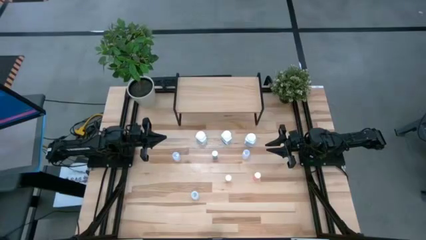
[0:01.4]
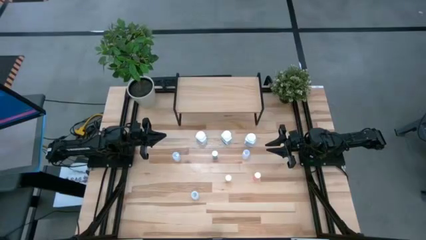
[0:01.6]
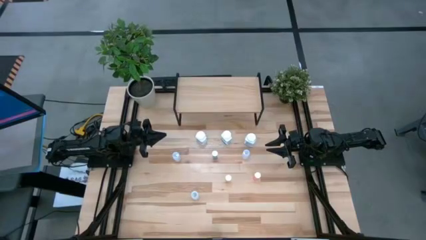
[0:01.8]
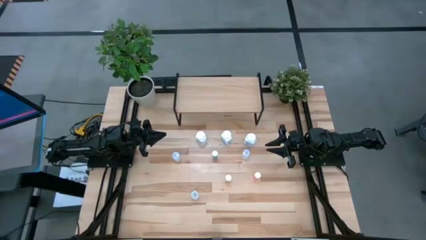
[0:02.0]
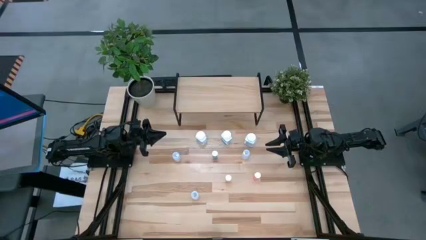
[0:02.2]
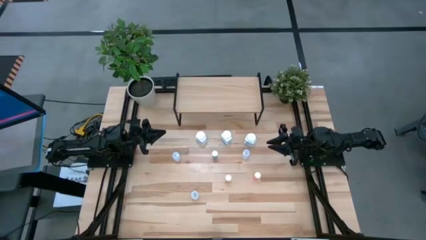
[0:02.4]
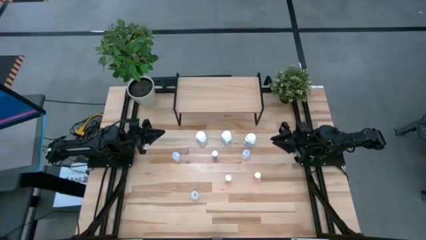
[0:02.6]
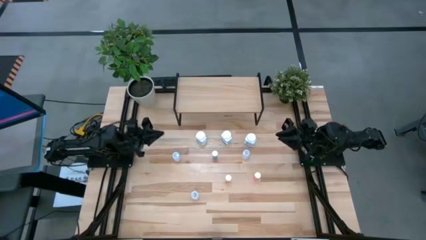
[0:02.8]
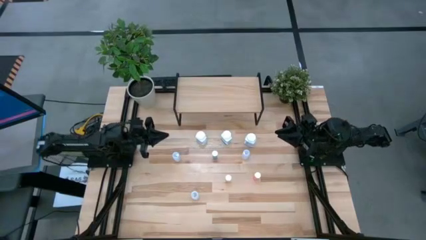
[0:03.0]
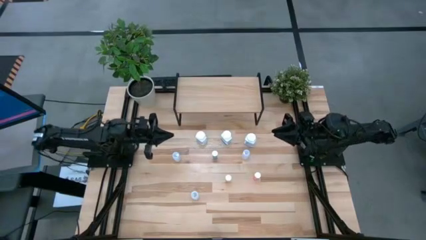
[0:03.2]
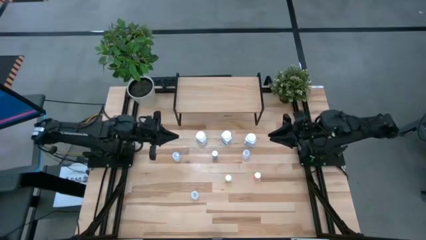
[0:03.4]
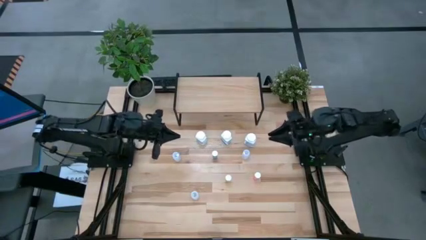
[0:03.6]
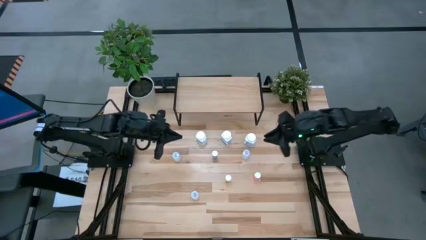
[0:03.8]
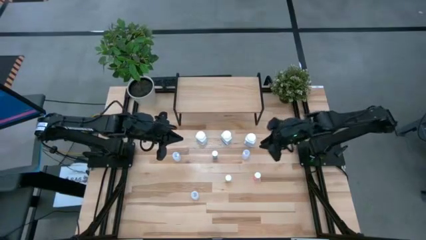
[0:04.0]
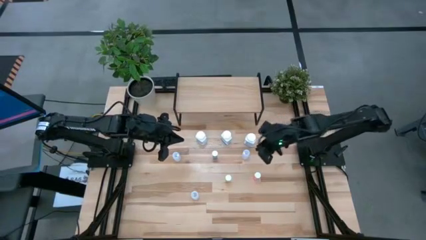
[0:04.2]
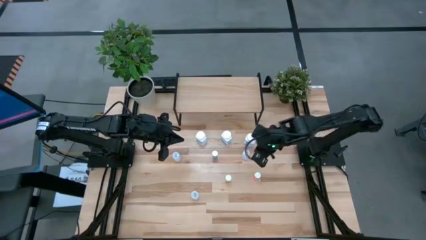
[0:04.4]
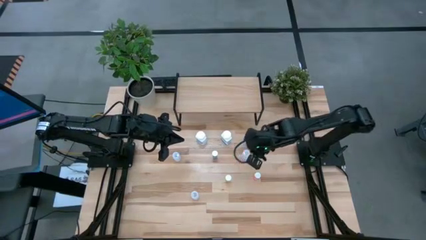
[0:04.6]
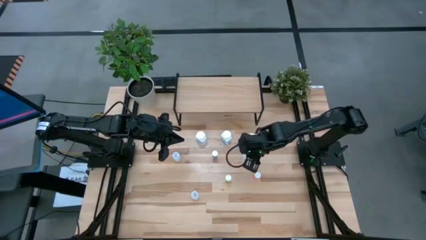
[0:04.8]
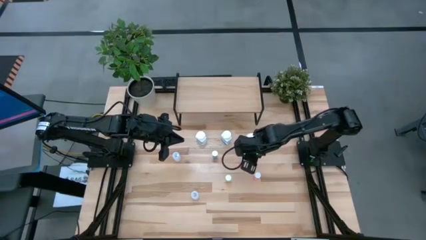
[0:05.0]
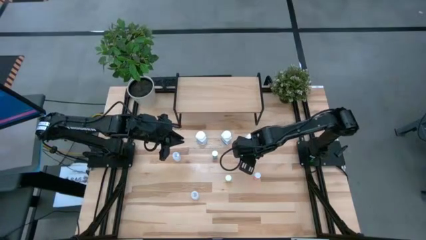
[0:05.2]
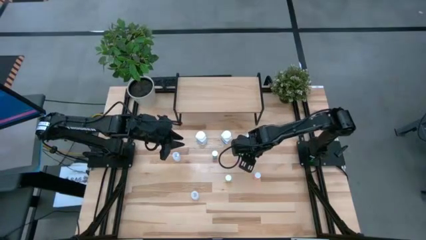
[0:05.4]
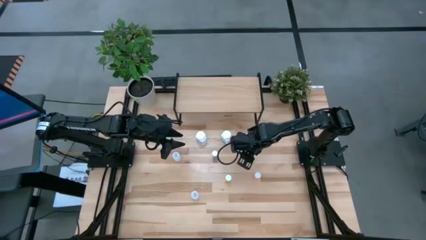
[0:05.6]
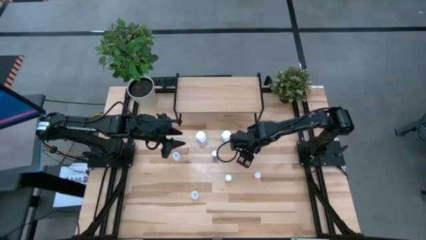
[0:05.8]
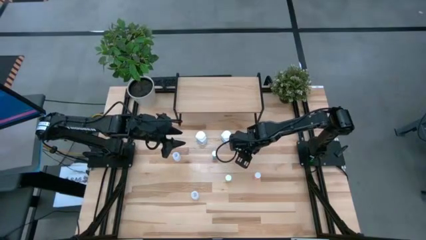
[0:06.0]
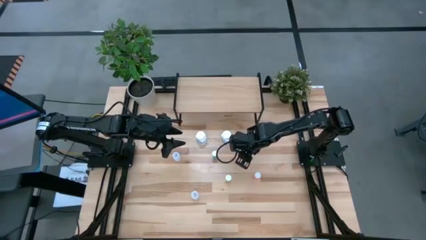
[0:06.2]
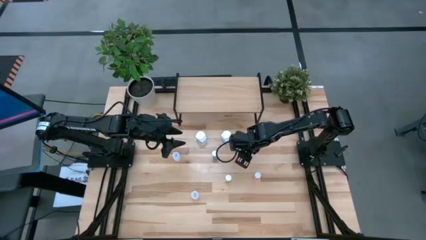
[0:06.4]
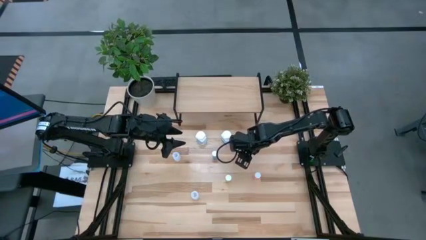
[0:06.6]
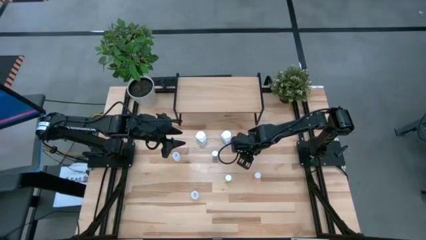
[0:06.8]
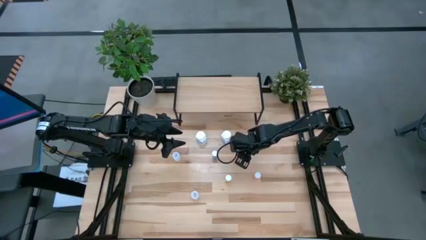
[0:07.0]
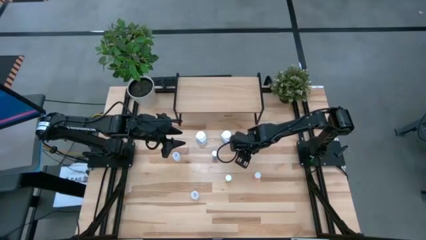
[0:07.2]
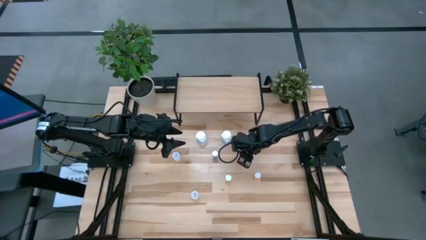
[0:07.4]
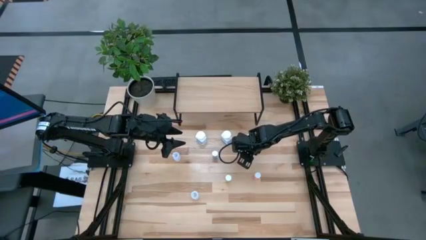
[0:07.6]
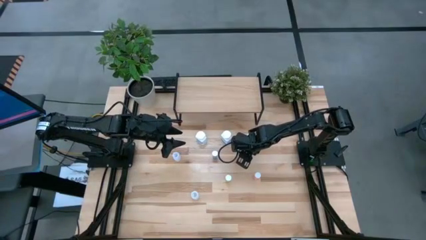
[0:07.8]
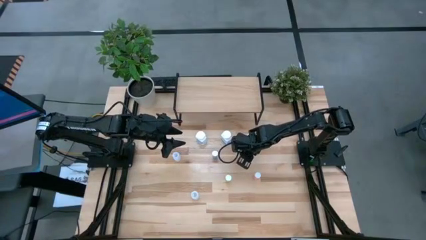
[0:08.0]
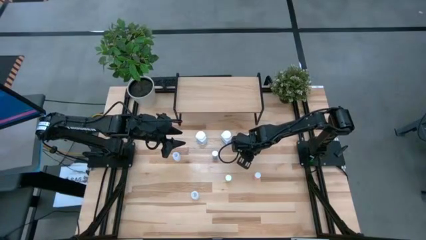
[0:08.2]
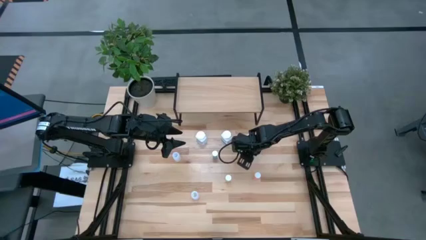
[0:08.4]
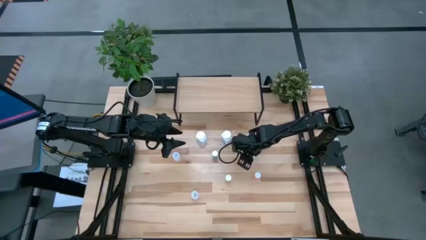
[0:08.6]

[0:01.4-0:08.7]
Task: Pick and place medicine bottles onto shelf by color
Put the top right white pill bottle on the shelf

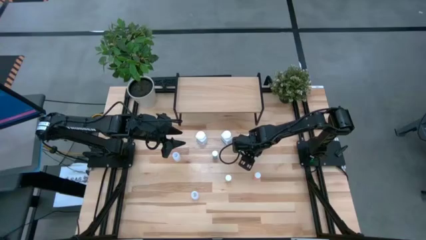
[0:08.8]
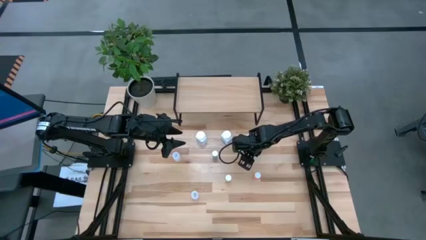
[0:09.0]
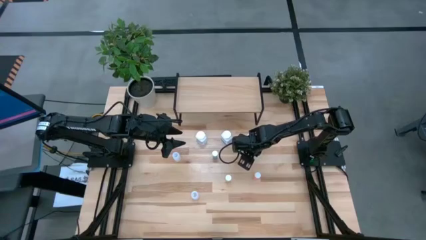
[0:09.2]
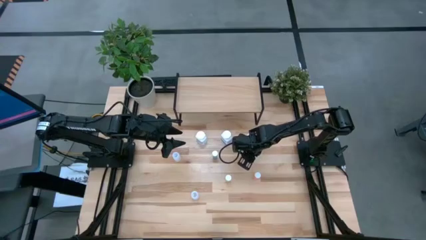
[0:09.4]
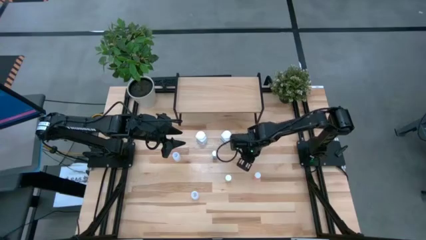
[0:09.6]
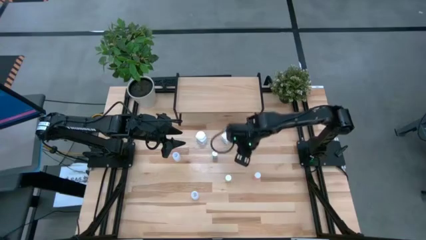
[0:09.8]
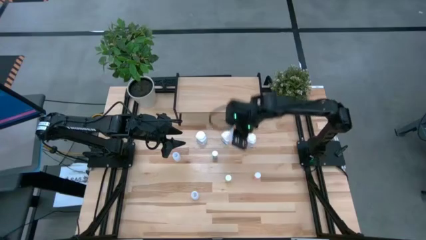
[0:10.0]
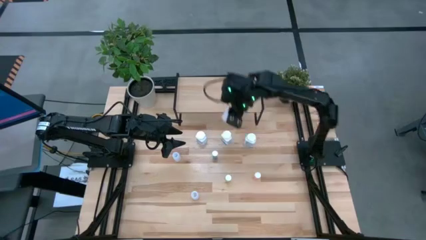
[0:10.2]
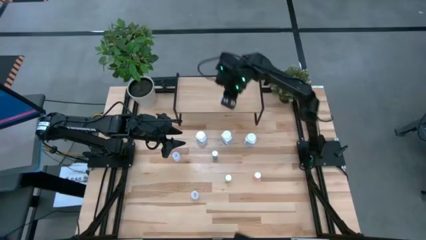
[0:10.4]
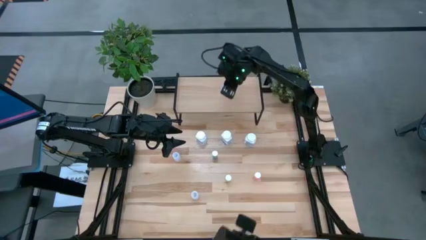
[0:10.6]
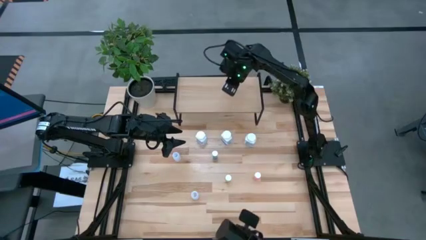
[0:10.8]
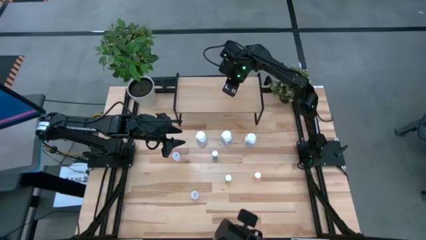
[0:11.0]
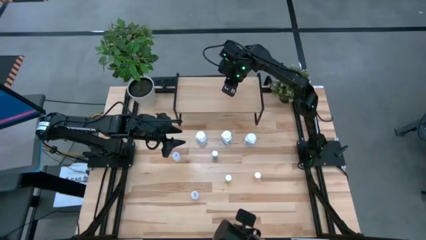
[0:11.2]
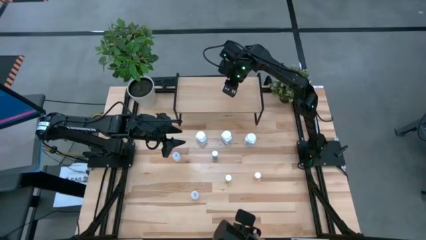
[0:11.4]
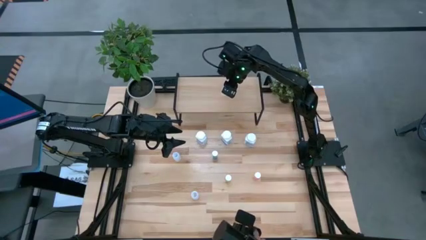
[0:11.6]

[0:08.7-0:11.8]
Put the top right white pill bottle on the shelf

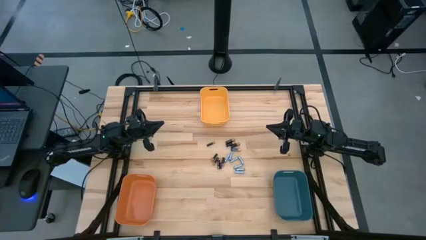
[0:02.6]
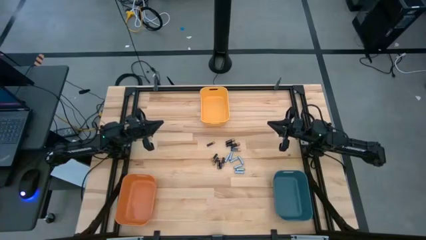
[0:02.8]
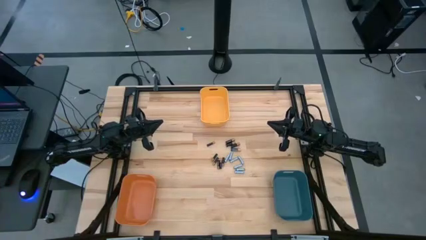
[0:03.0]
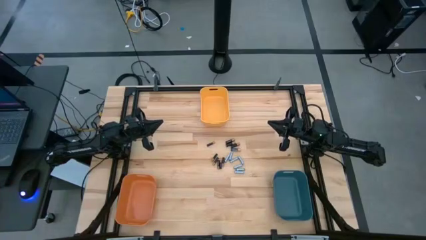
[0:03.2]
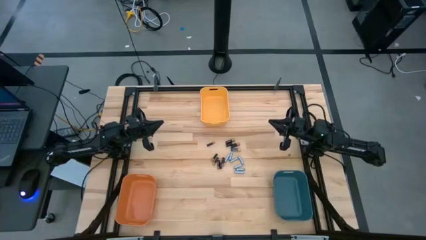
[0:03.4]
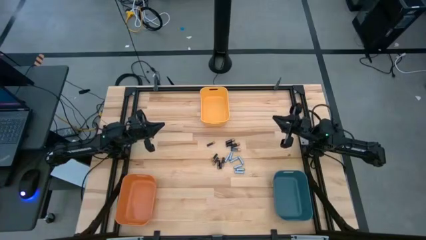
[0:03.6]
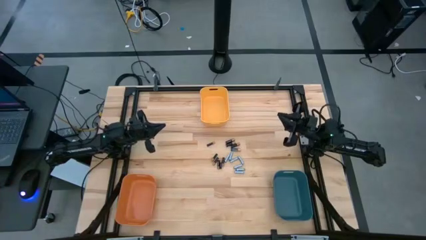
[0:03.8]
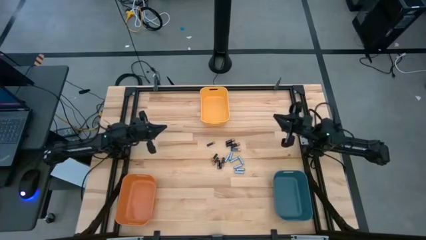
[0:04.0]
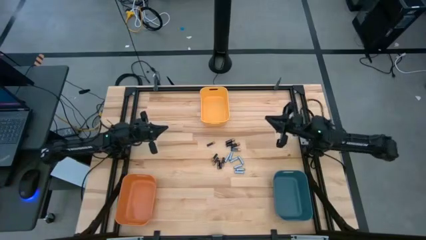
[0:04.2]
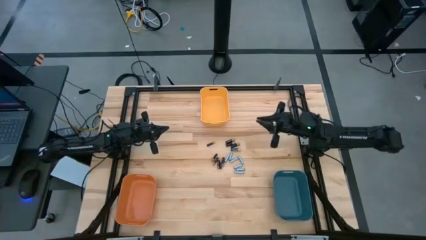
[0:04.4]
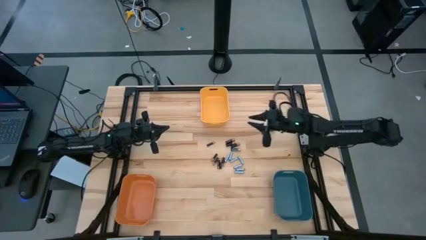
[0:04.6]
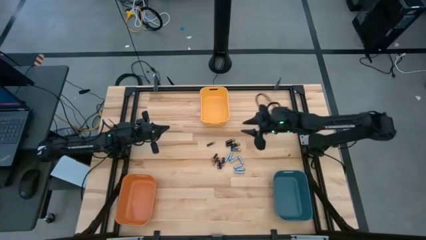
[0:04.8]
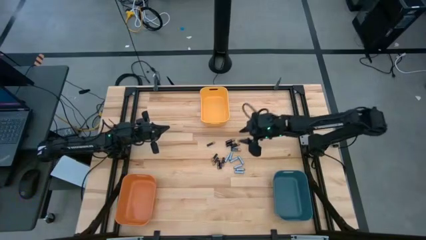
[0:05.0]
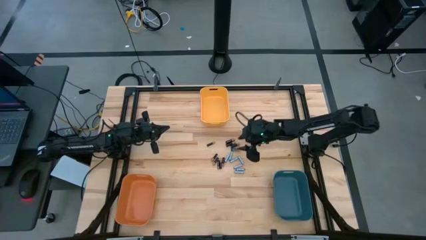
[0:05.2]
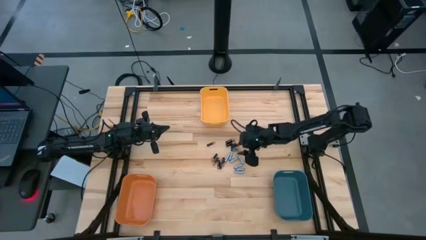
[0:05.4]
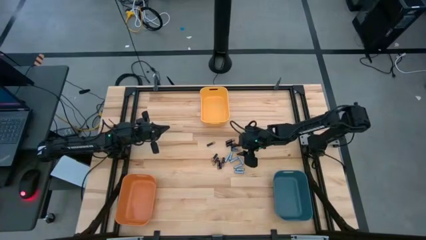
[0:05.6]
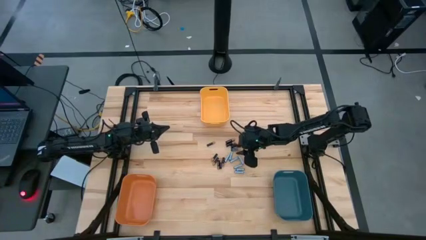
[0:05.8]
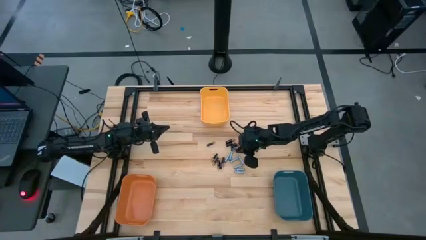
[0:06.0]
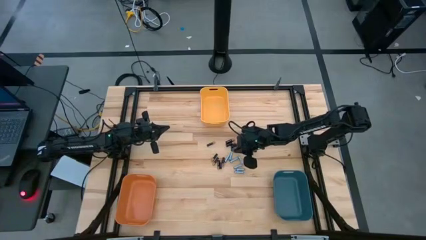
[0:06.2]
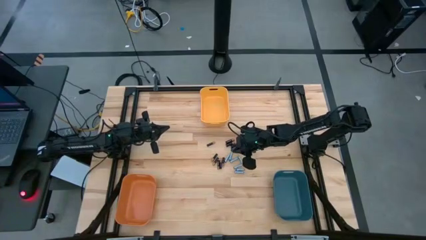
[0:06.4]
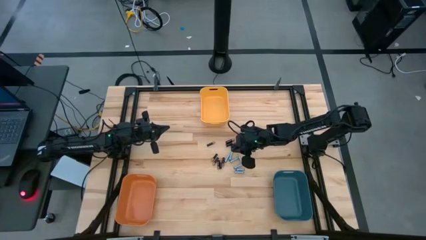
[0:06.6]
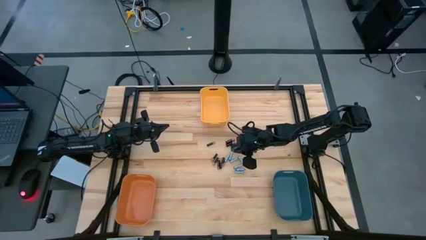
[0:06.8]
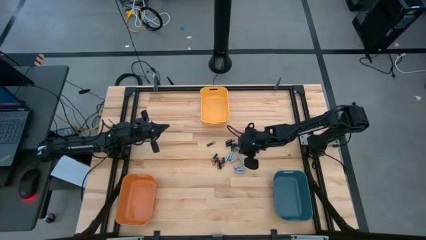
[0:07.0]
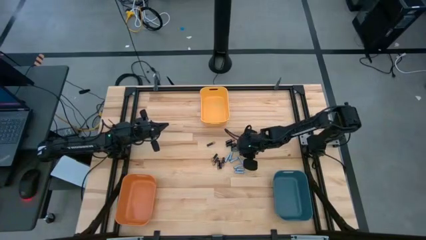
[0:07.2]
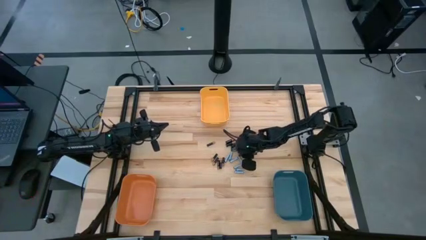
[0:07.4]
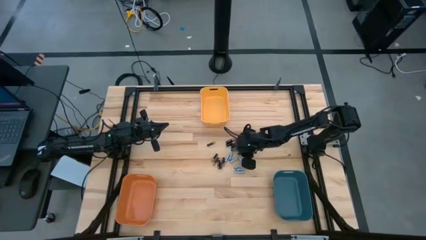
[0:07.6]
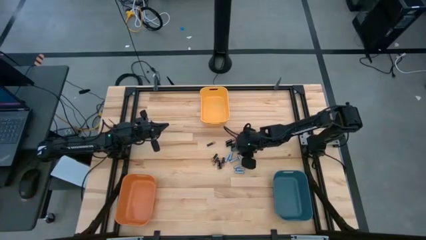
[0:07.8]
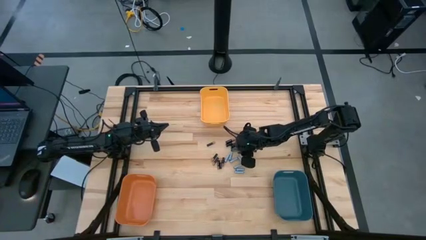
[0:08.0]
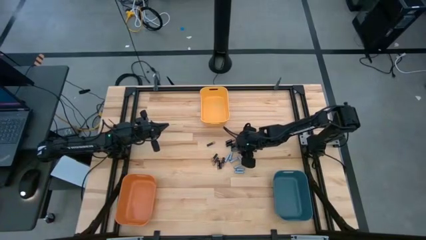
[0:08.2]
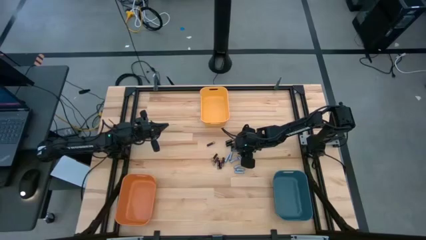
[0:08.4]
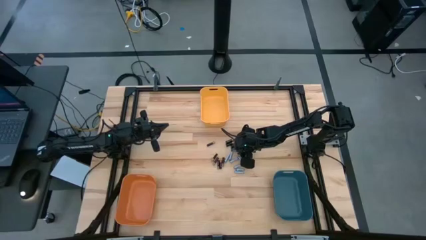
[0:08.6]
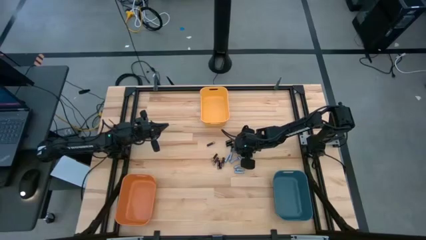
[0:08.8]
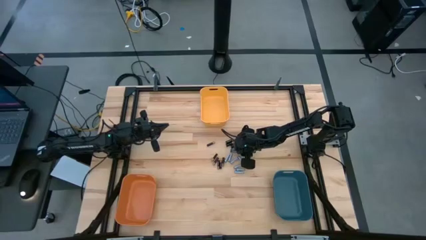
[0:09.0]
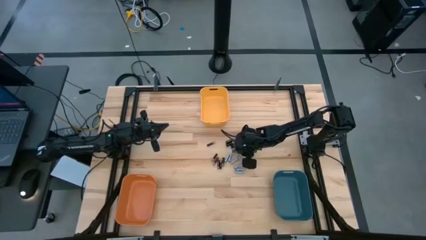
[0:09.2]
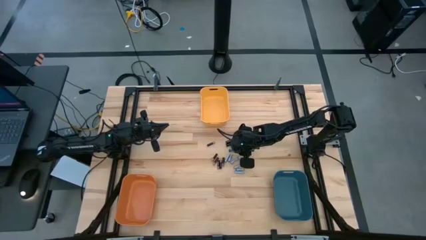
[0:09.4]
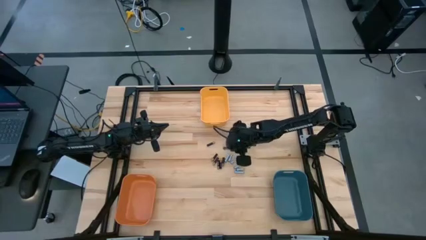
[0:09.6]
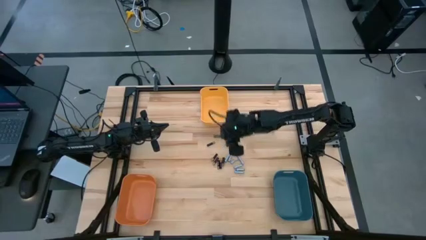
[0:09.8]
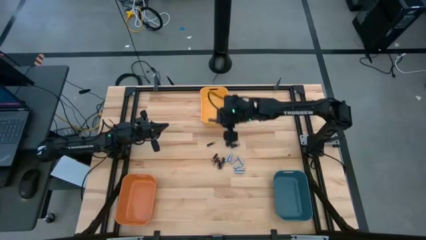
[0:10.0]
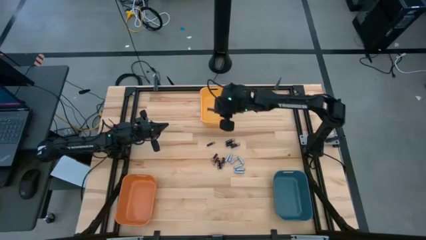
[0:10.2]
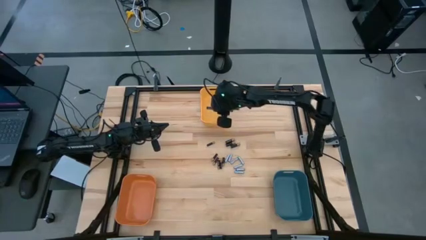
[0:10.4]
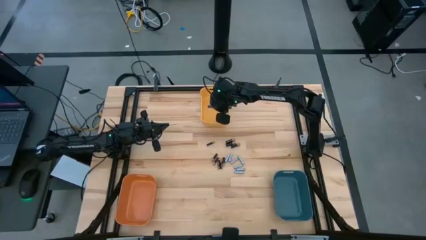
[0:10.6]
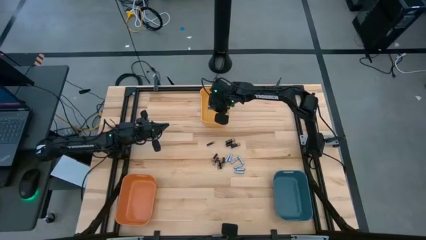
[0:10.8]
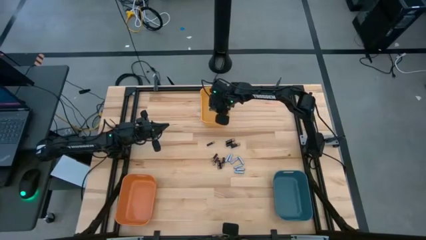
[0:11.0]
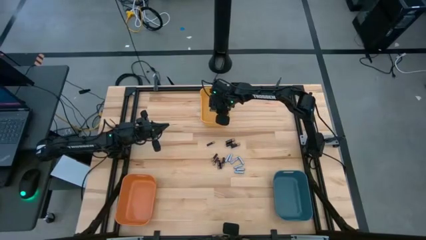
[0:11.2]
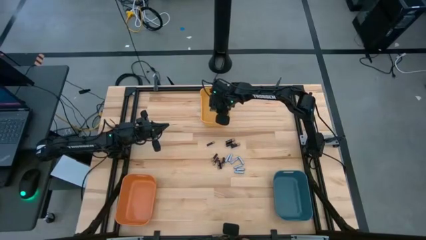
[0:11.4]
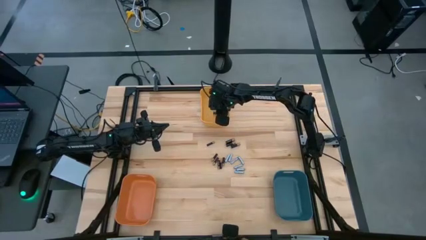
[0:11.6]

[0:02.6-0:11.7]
Task: Sort batteries
Put the large black battery into the yellow bin
